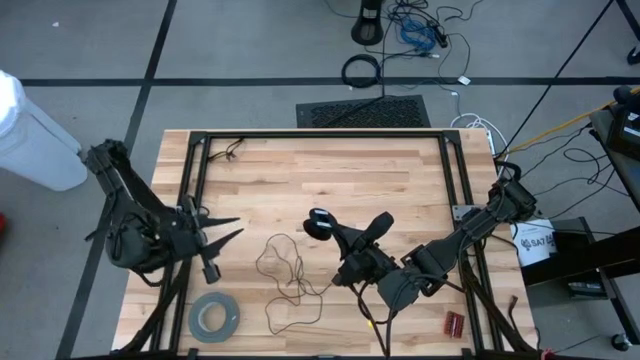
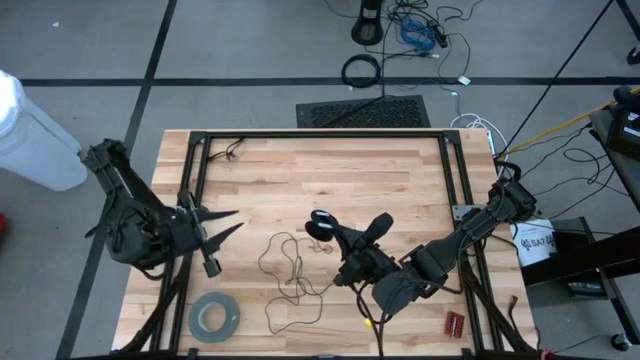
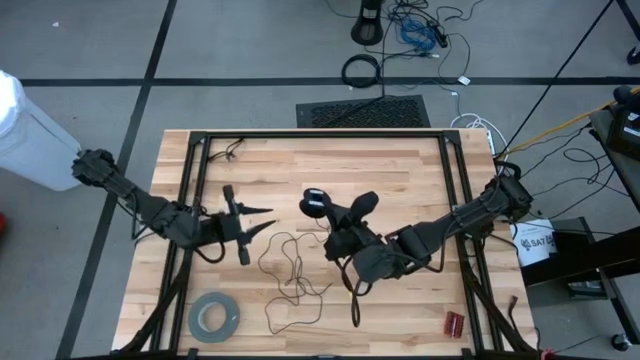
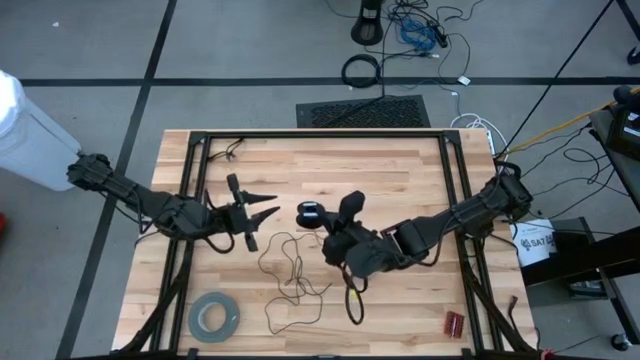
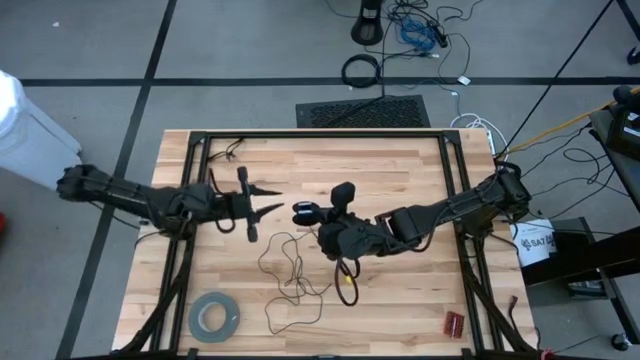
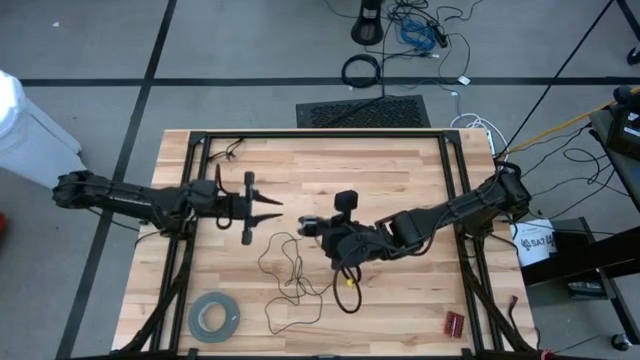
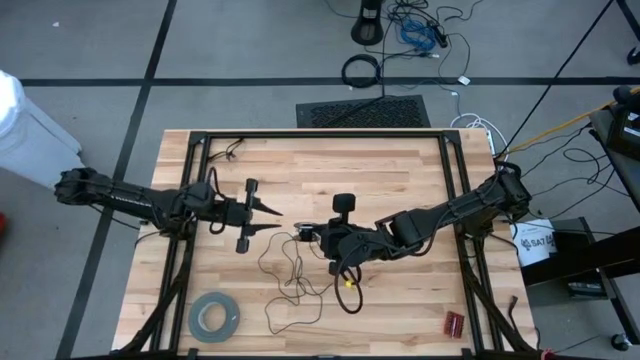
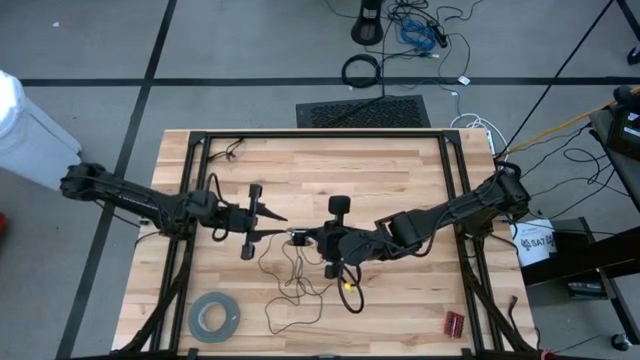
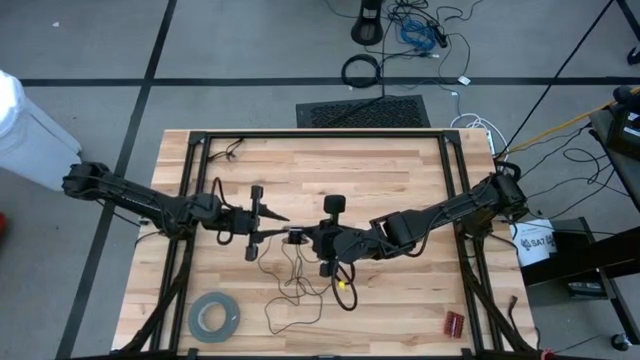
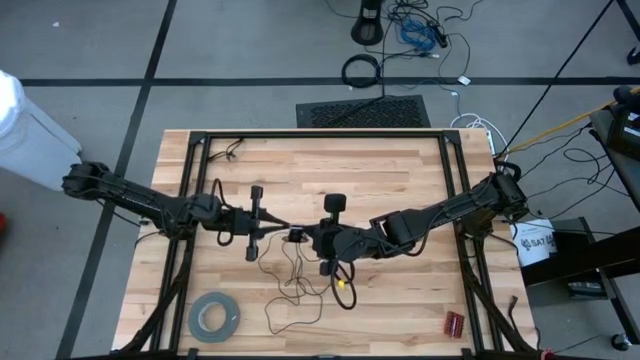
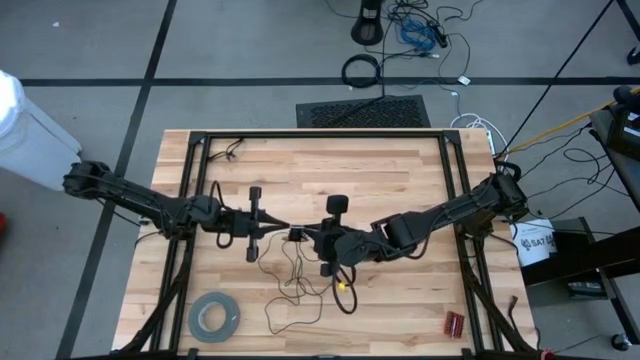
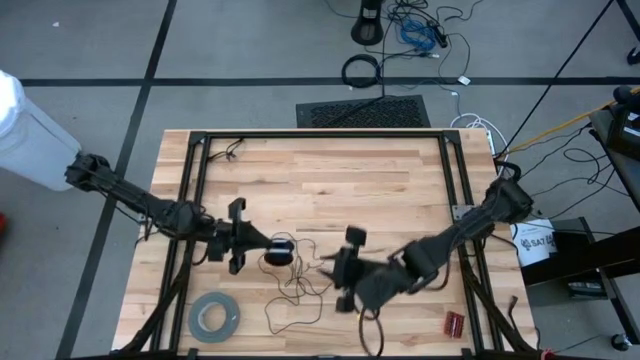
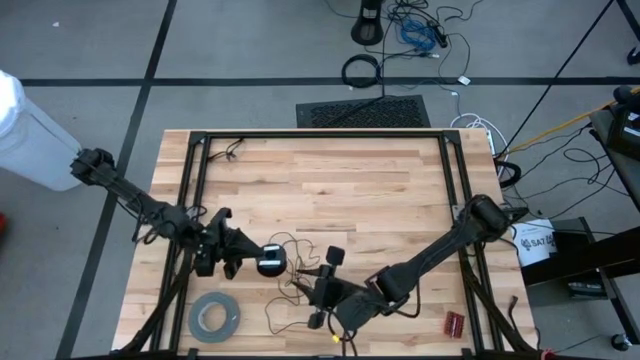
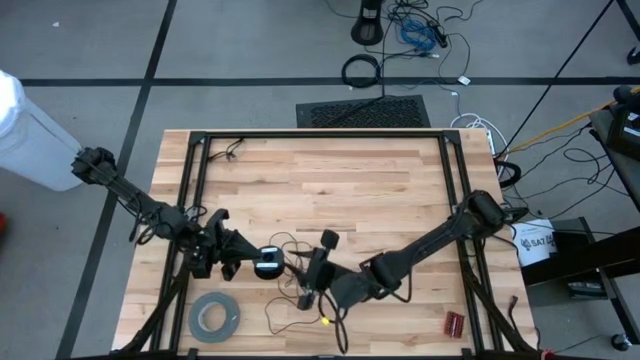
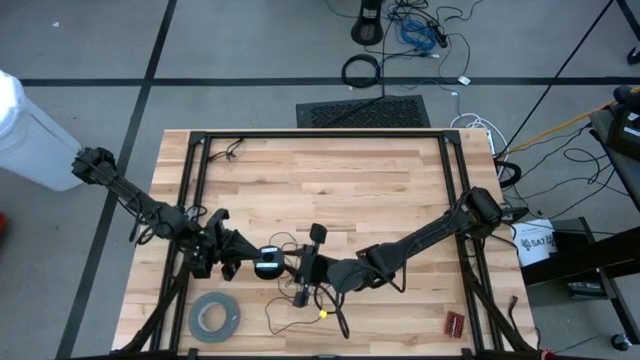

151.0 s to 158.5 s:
Task: Coil cords
Uncoil the black wire from the spool

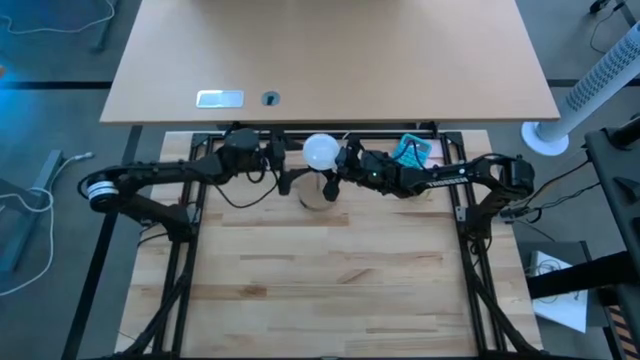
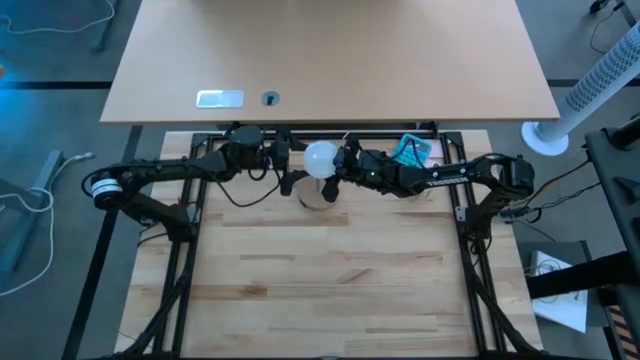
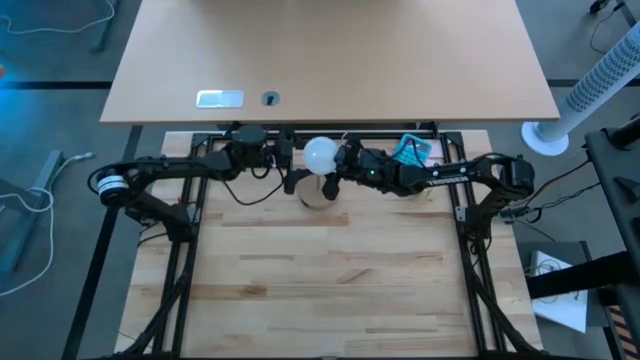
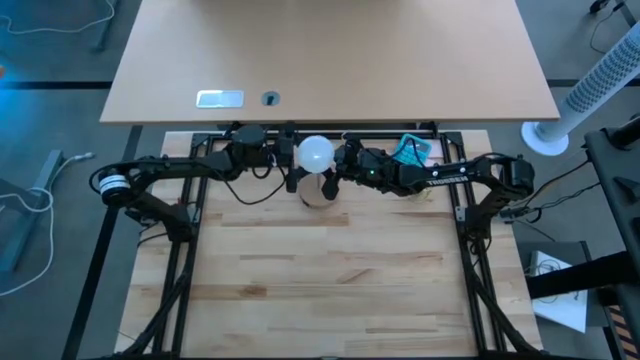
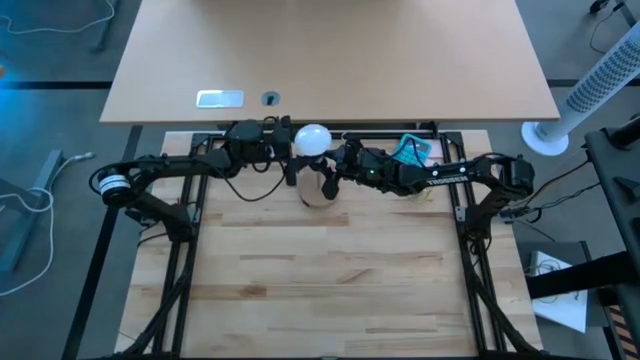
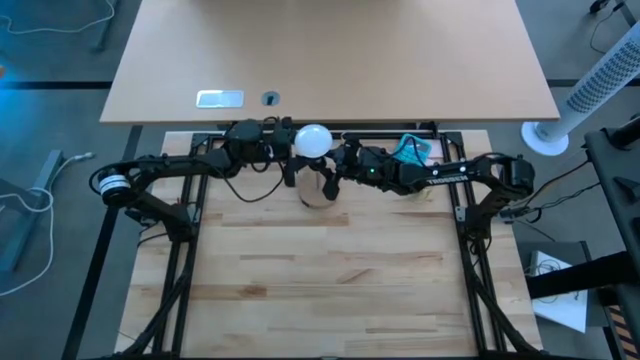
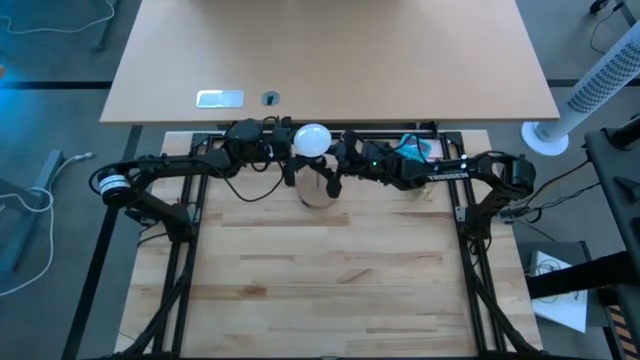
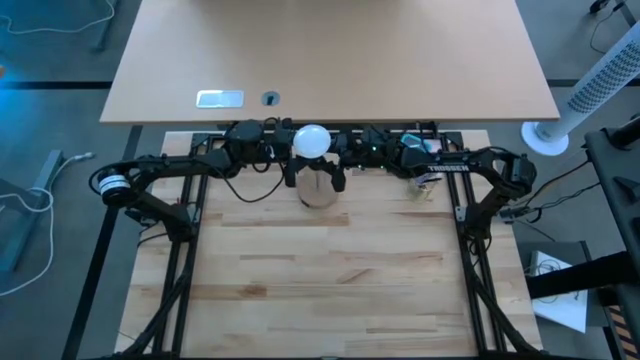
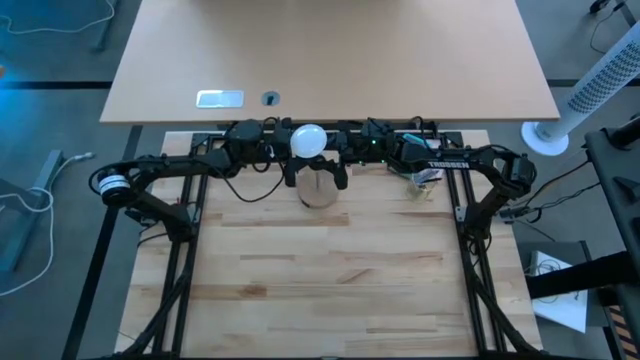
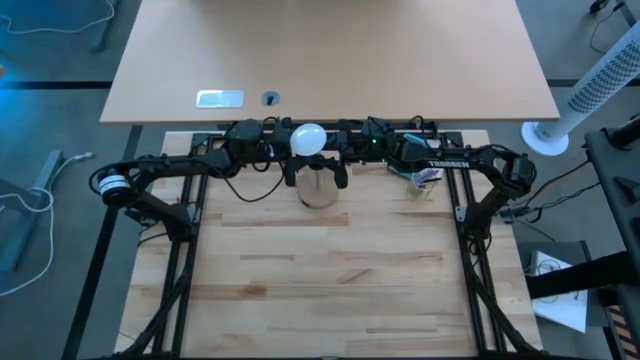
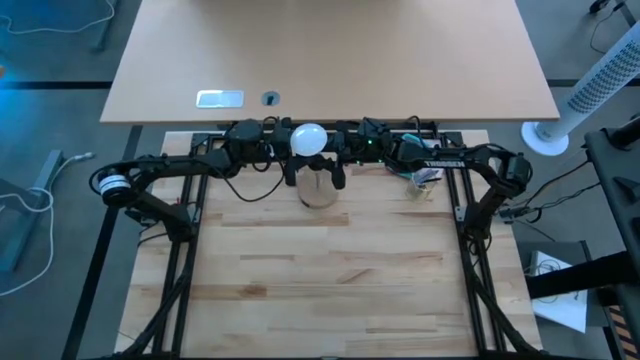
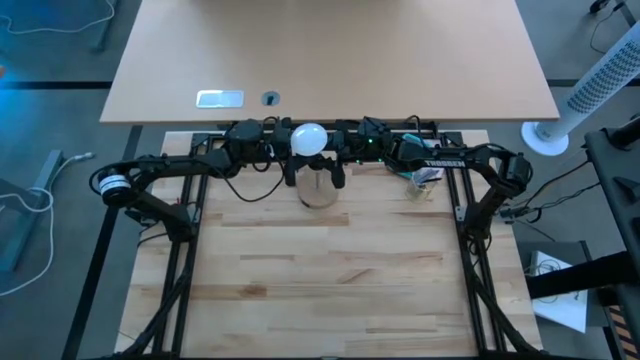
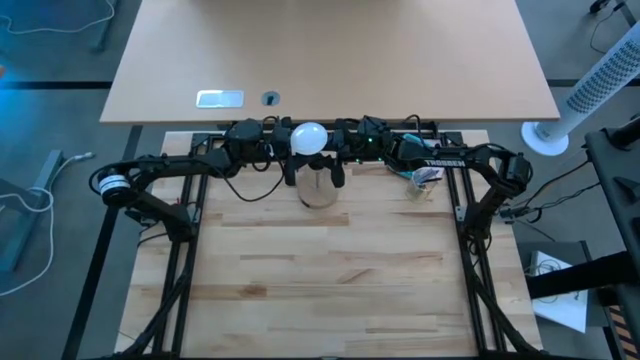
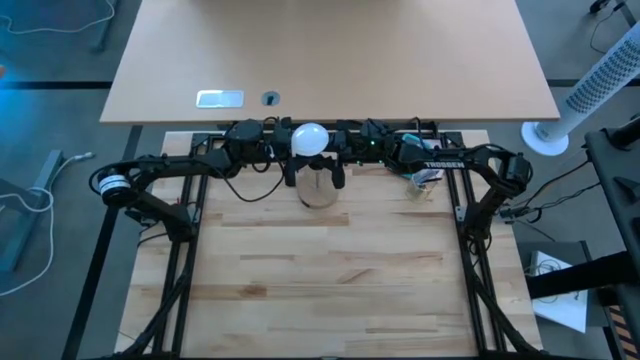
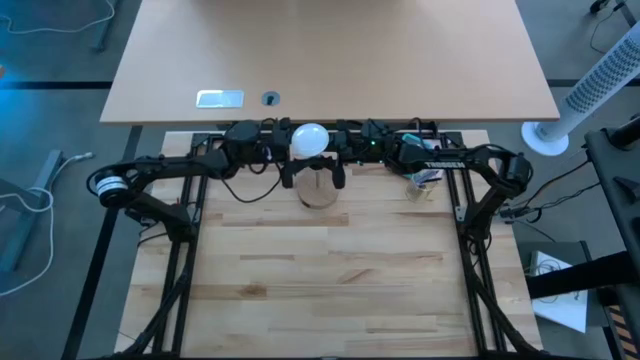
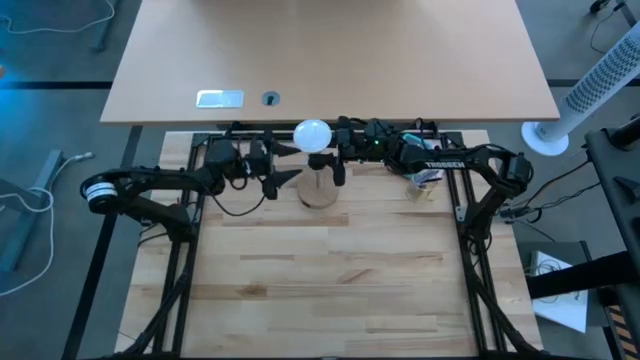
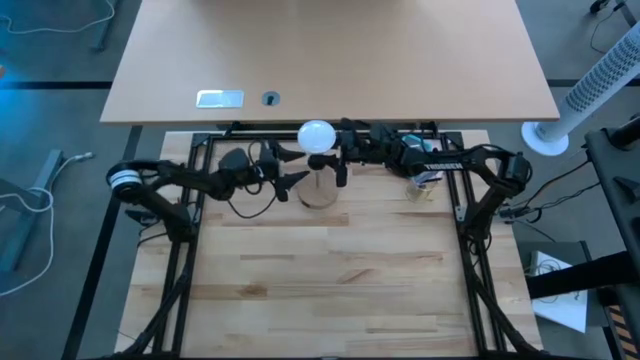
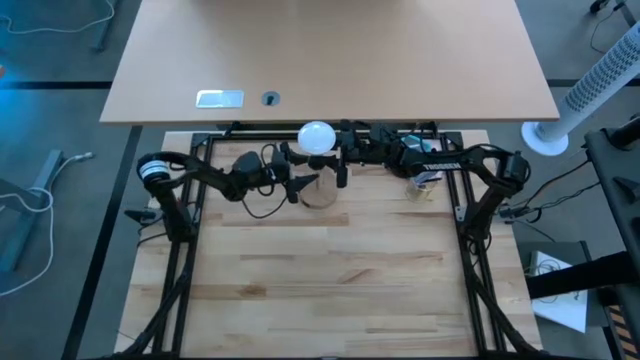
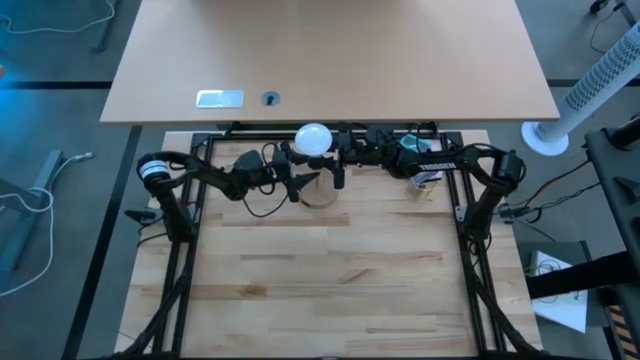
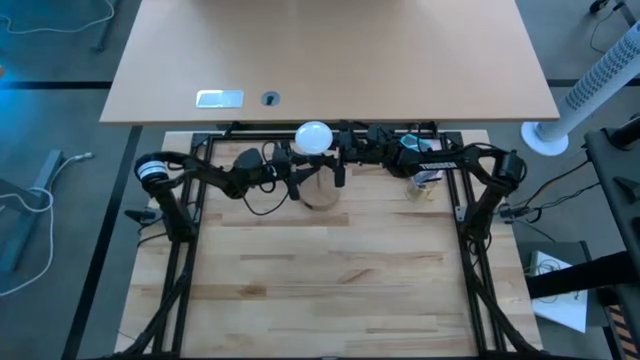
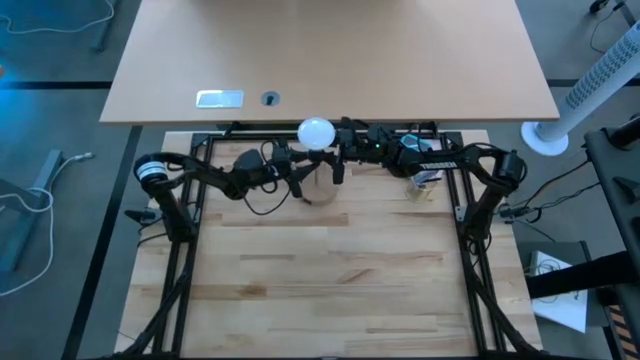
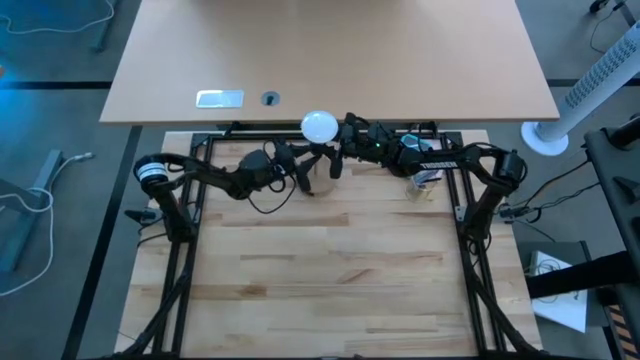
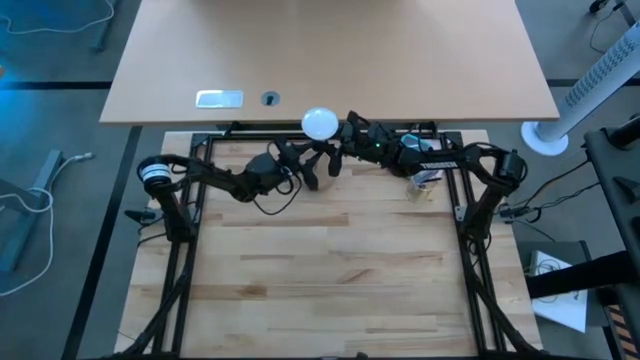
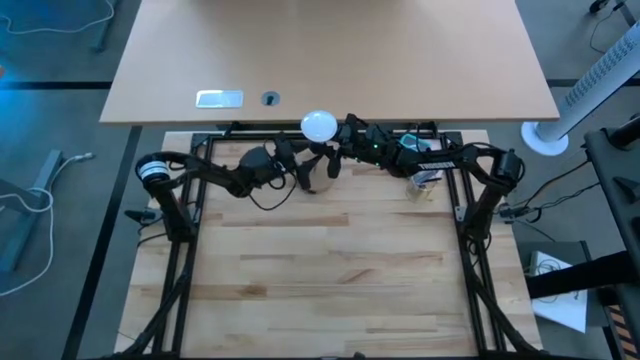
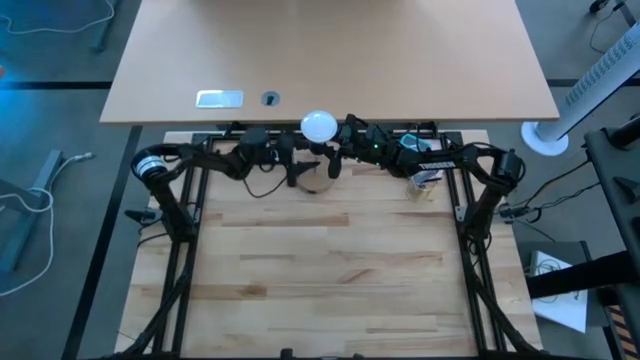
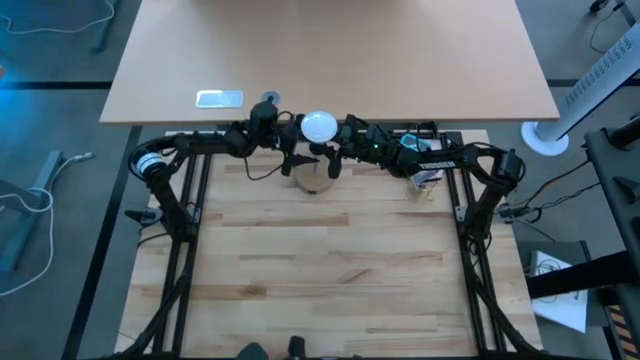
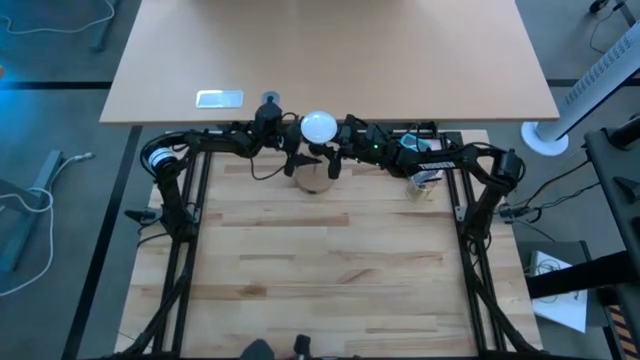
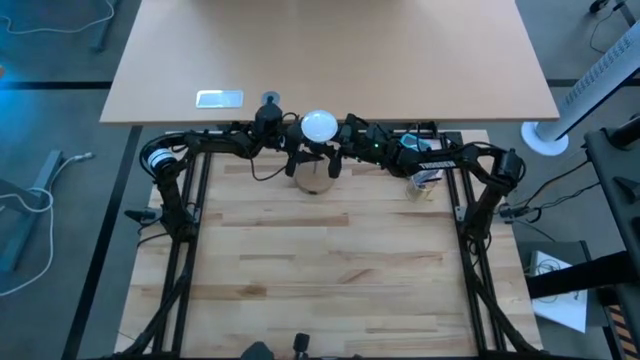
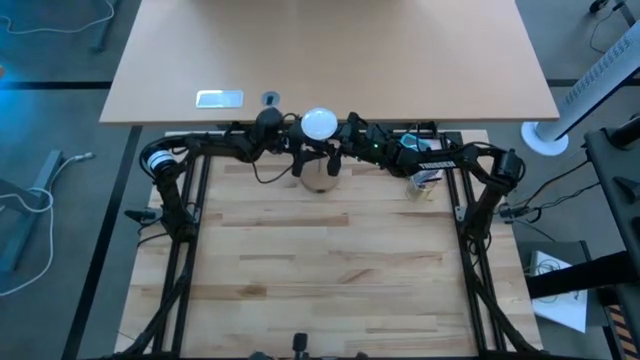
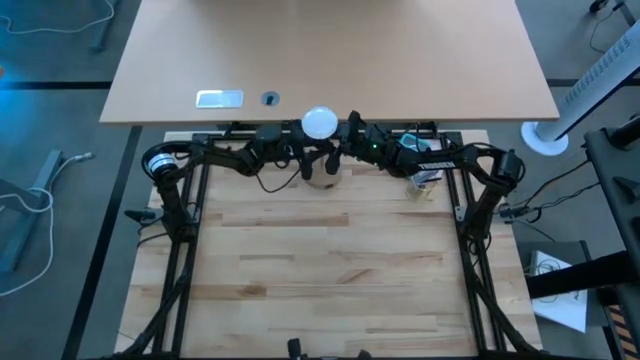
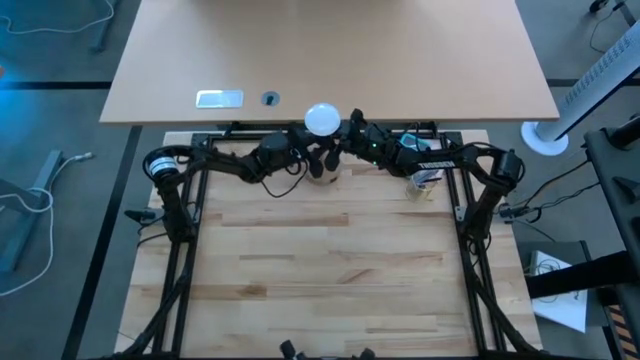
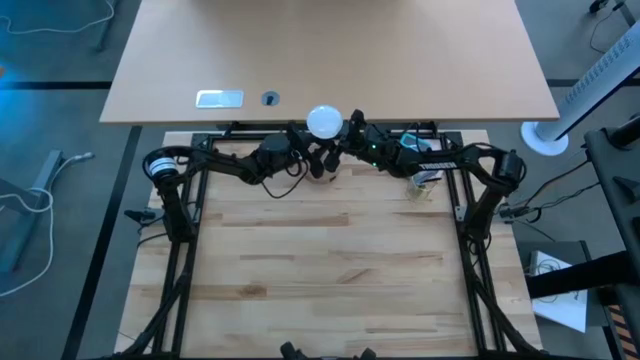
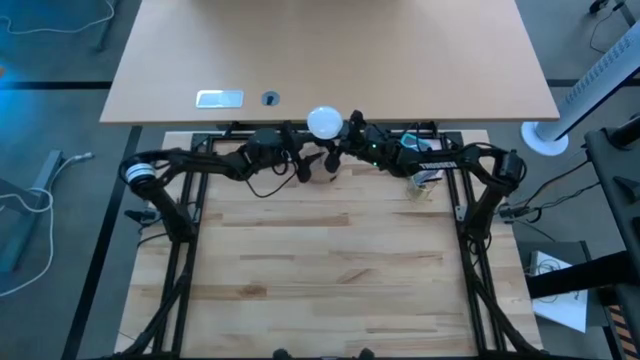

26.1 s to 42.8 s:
Task: Screw lightbulb
Insert the light bulb into the table lamp
